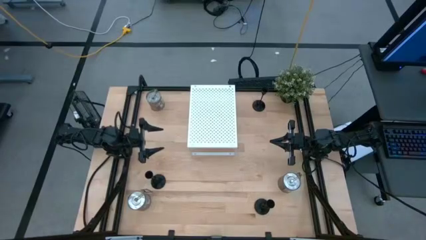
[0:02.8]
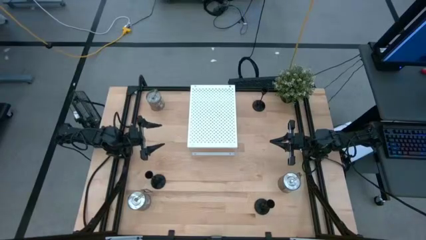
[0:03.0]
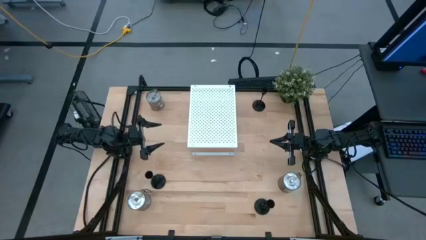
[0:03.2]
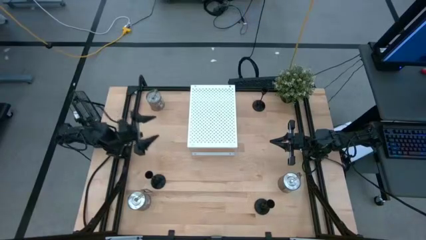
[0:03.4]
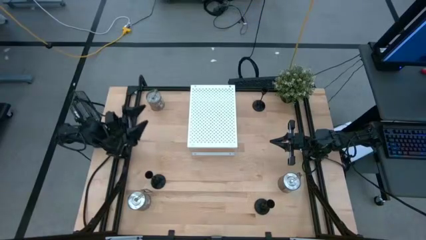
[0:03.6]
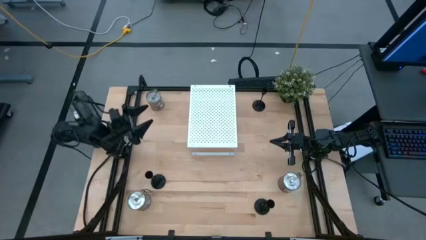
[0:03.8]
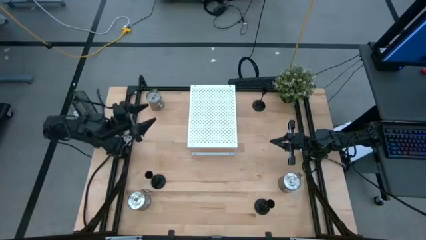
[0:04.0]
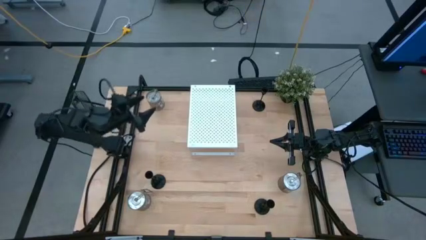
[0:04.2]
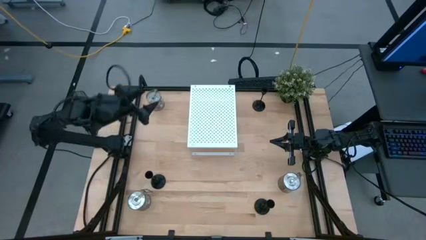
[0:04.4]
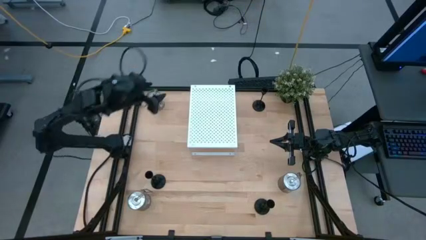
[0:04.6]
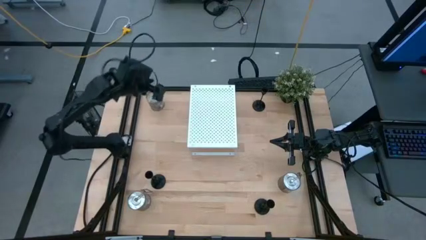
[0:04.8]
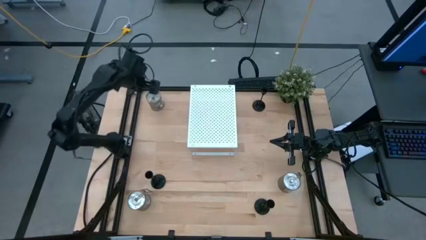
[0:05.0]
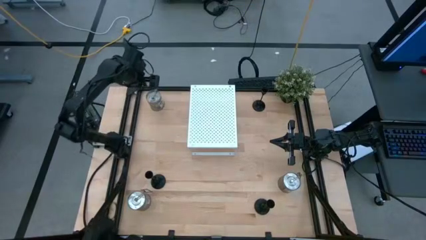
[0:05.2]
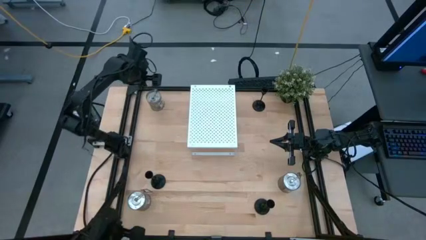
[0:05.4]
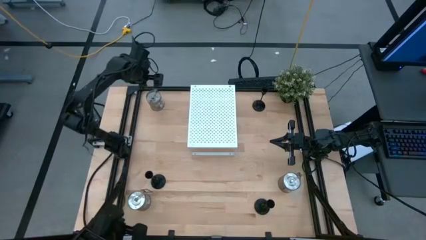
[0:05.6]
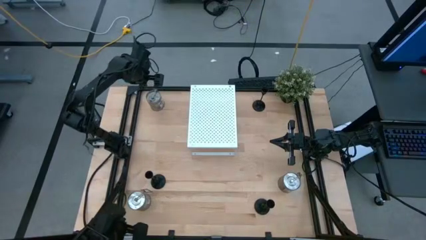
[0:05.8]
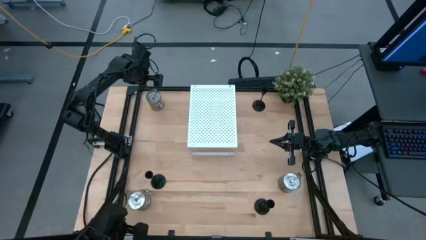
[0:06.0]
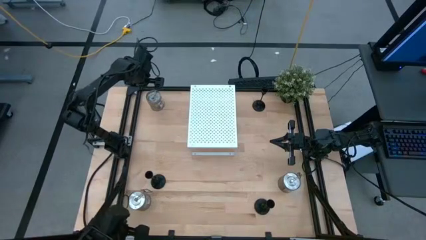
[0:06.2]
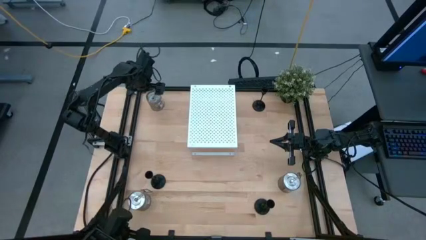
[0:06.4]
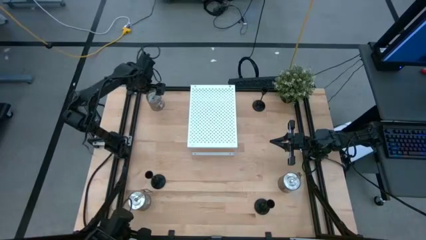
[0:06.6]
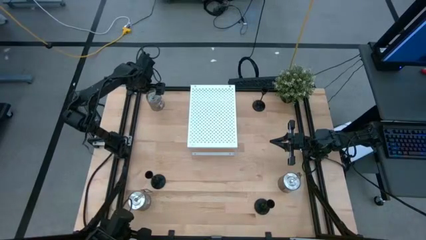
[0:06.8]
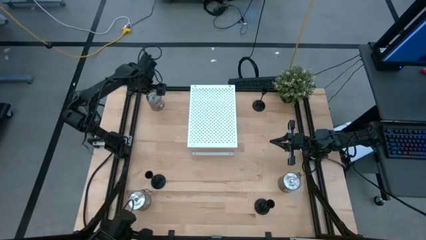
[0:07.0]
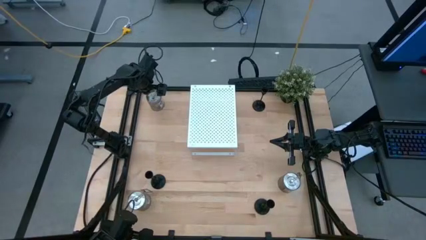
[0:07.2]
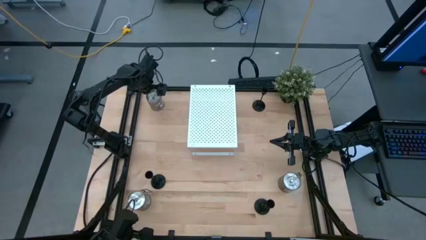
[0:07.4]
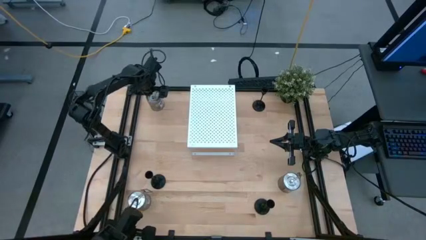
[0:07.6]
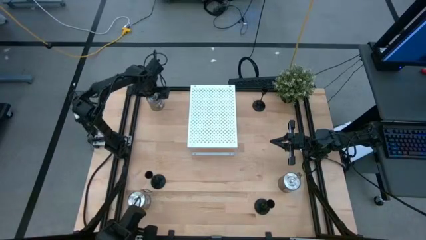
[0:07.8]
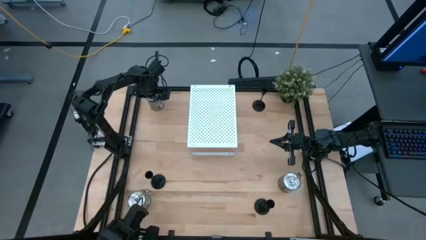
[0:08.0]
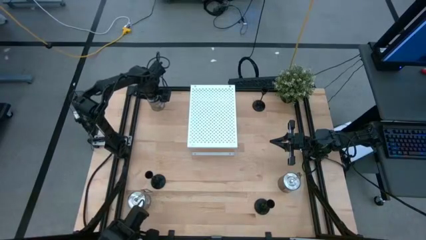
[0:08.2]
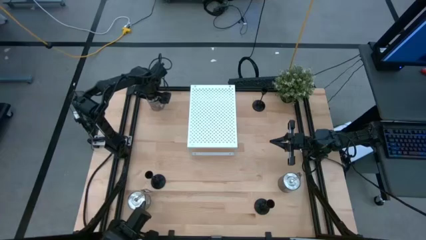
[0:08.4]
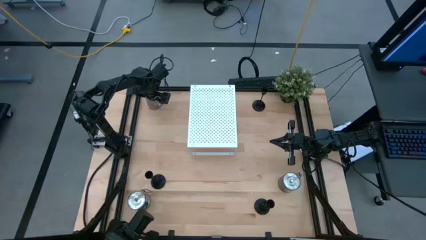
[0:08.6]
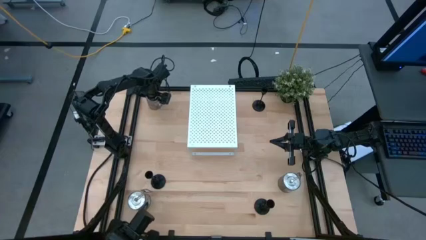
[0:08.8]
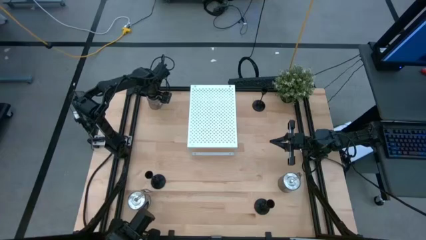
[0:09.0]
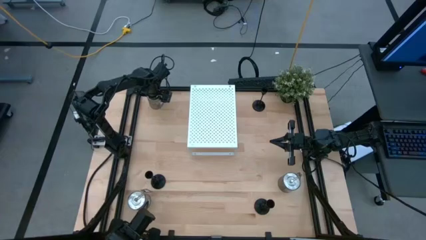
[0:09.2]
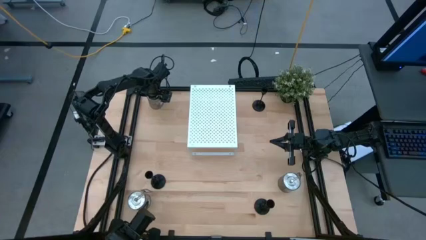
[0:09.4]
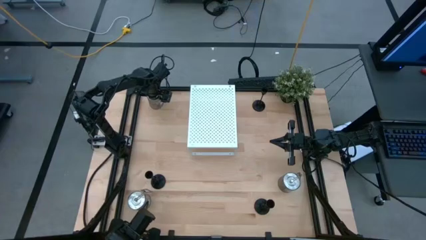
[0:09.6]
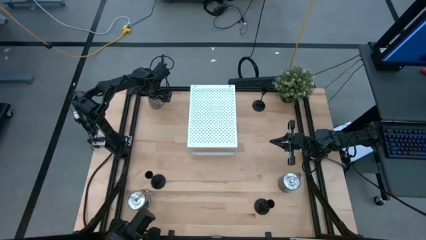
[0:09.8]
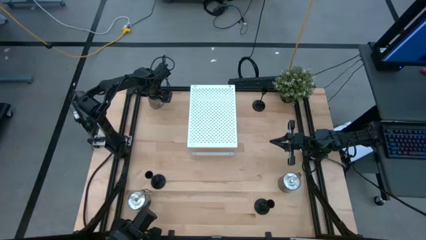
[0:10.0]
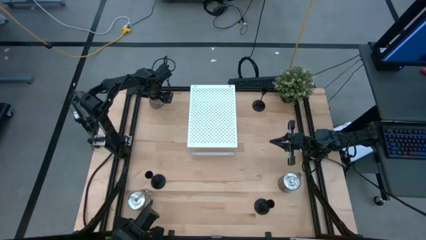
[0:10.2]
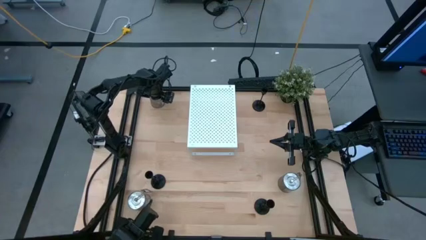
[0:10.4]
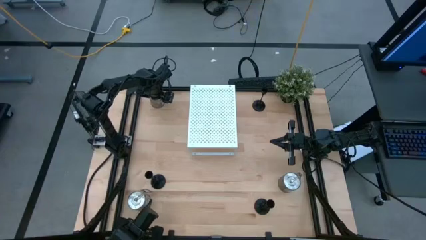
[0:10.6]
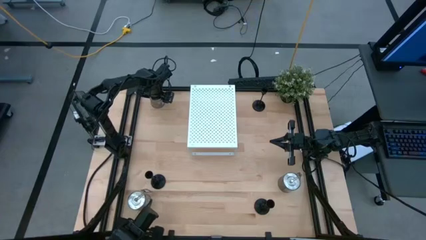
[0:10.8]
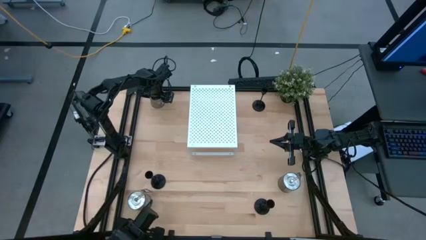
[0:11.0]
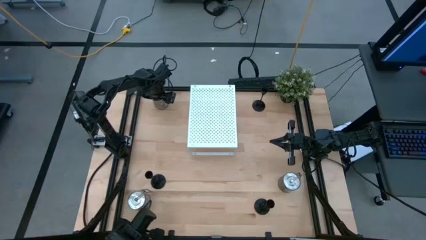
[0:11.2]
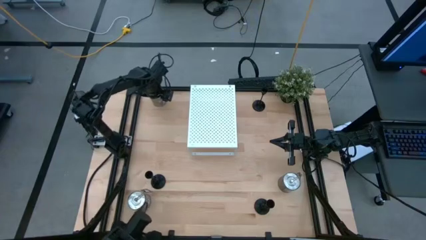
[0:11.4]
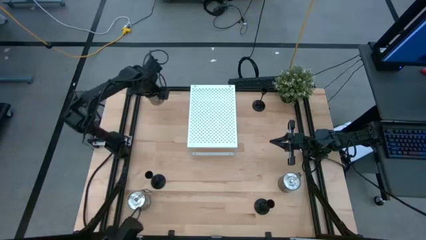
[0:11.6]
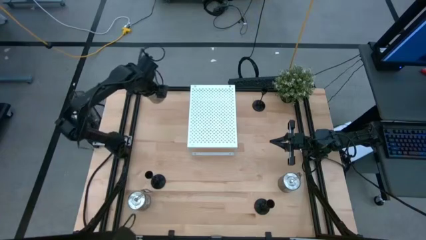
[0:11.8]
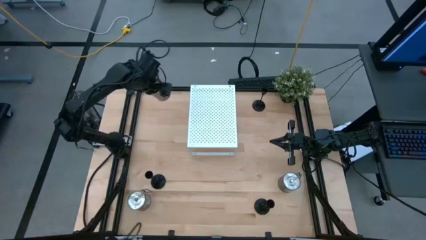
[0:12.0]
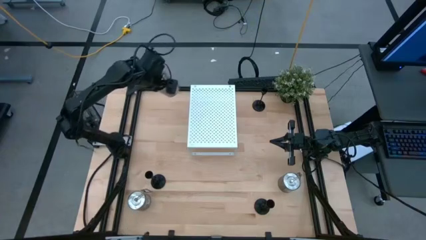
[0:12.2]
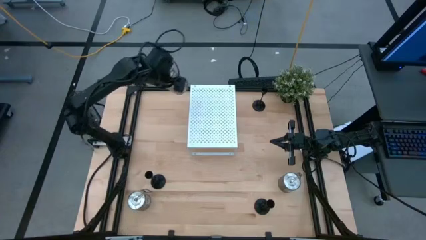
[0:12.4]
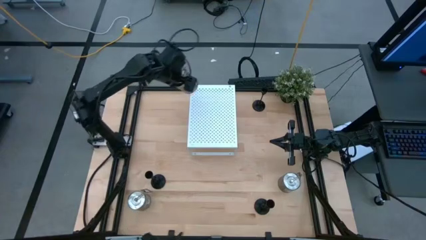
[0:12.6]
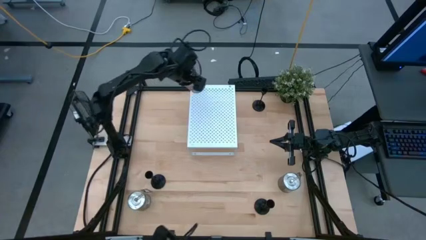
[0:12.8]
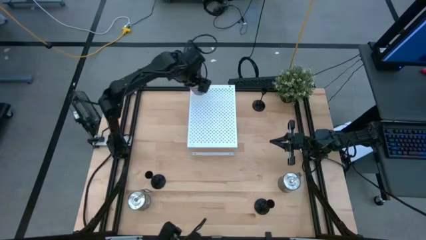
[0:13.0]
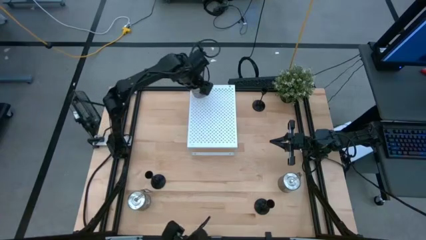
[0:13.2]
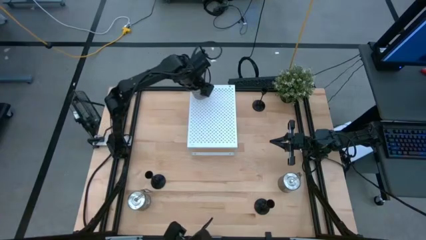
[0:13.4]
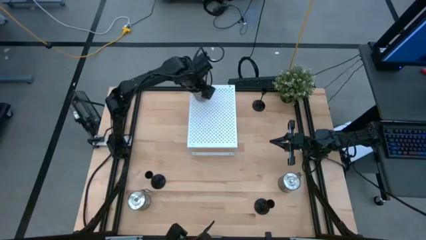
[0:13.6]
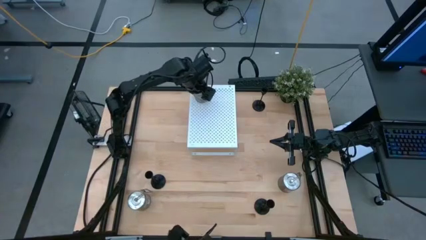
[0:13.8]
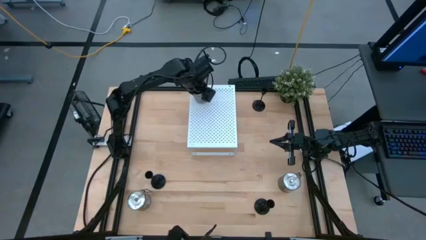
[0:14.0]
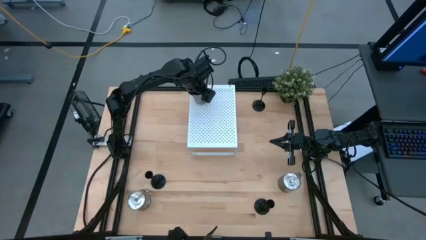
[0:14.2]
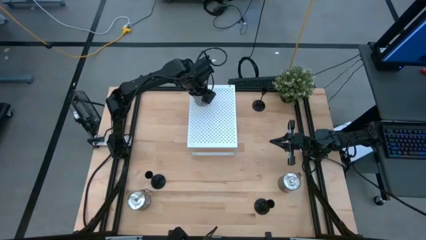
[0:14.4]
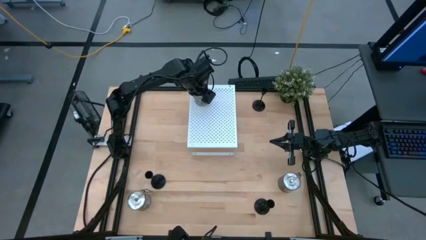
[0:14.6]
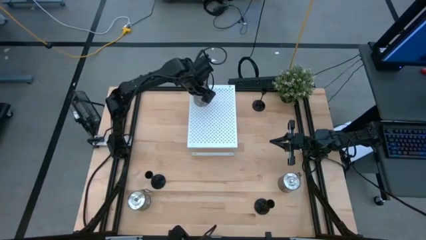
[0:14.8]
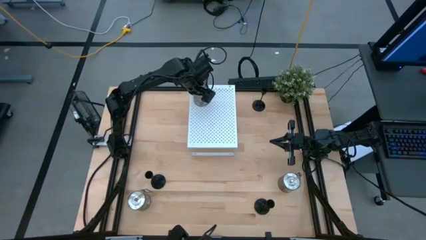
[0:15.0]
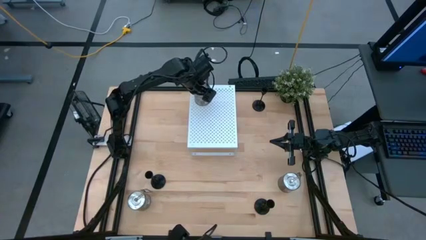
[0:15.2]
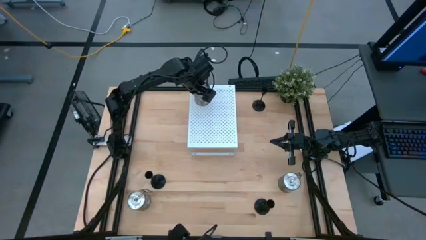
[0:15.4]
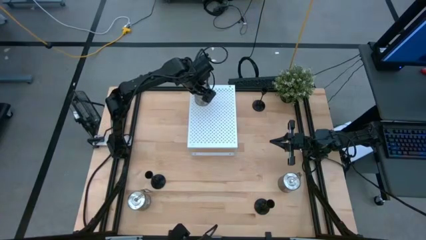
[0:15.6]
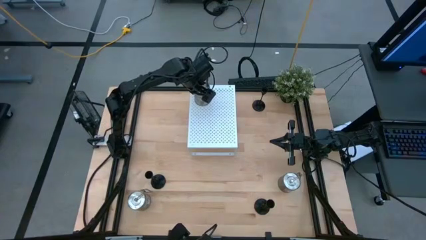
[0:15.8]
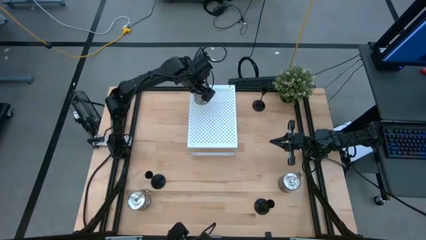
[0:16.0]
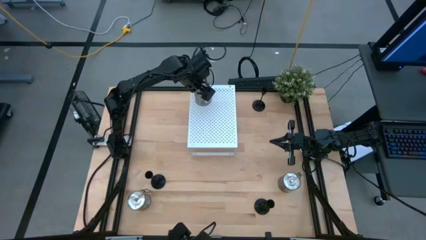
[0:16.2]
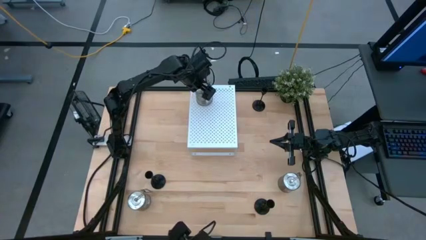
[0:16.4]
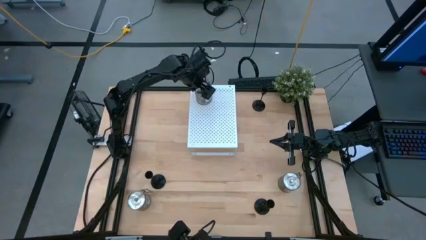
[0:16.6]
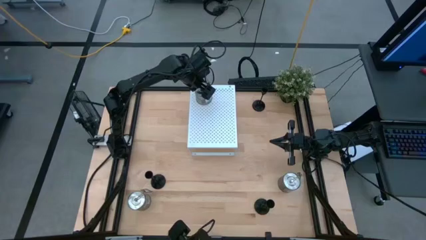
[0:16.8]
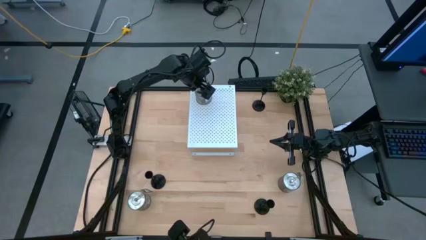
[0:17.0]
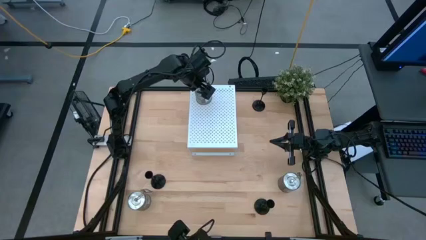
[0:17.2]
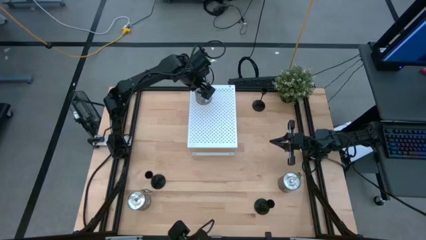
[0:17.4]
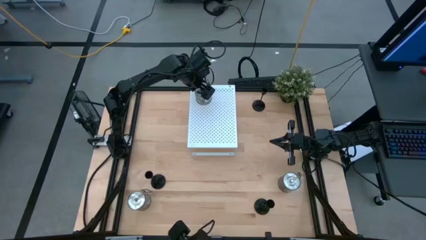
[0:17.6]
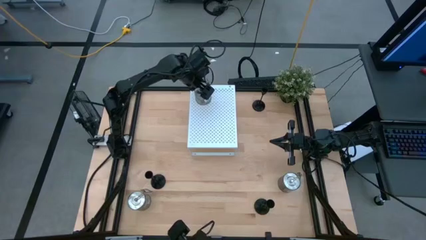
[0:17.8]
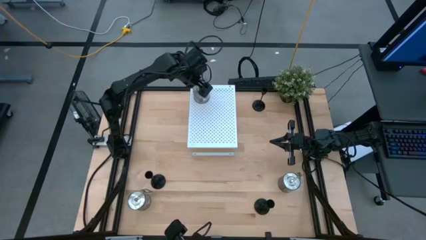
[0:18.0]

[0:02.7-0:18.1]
Task: Pick & Place candle stick holders
Put the top silver scented candle on the shelf
